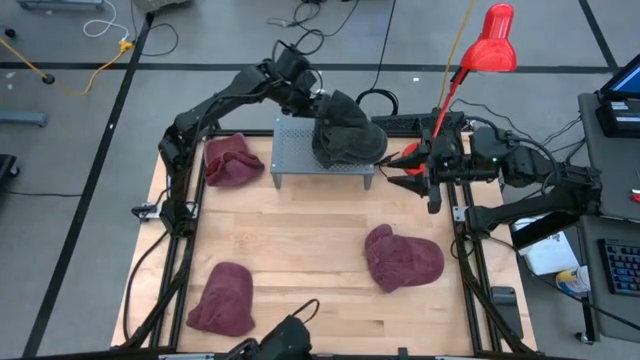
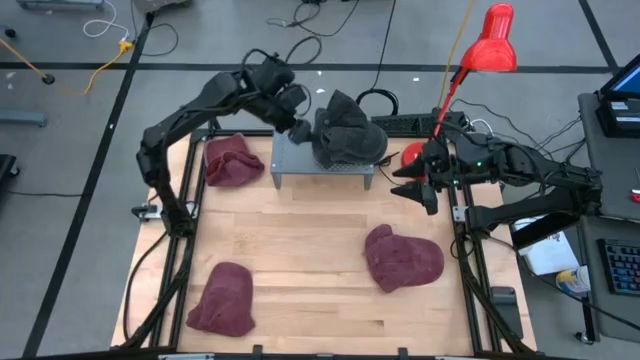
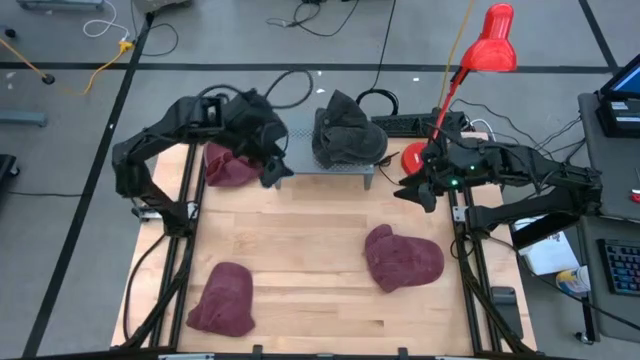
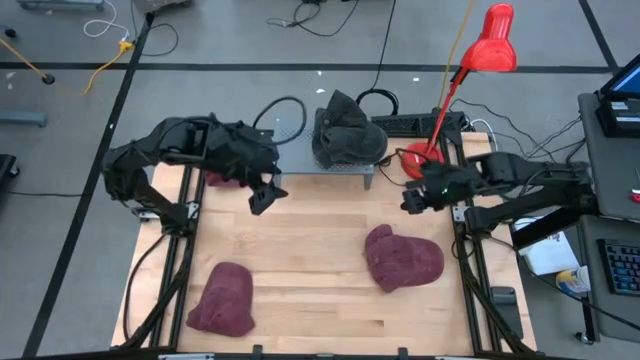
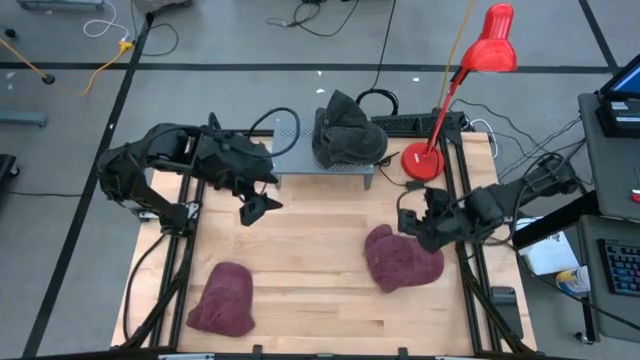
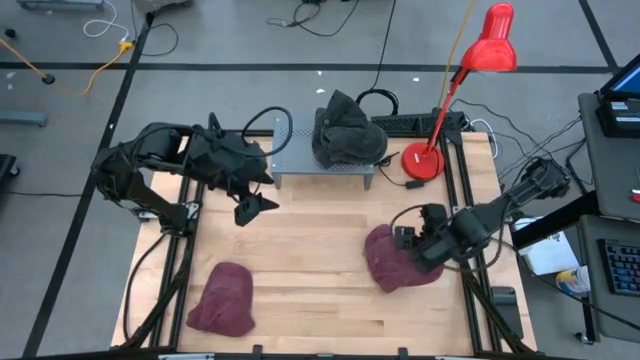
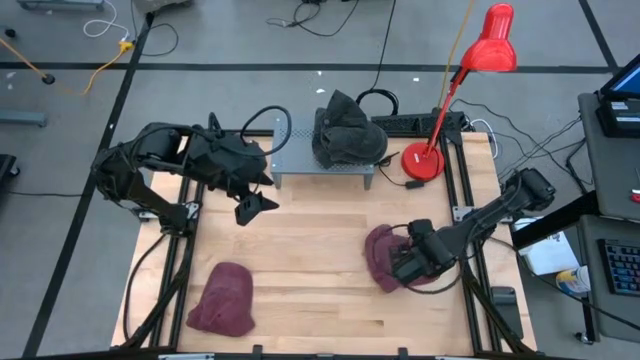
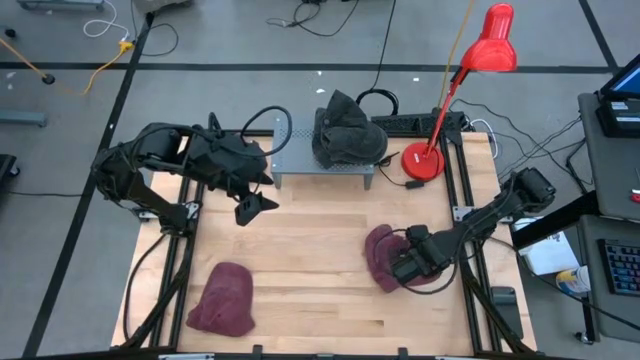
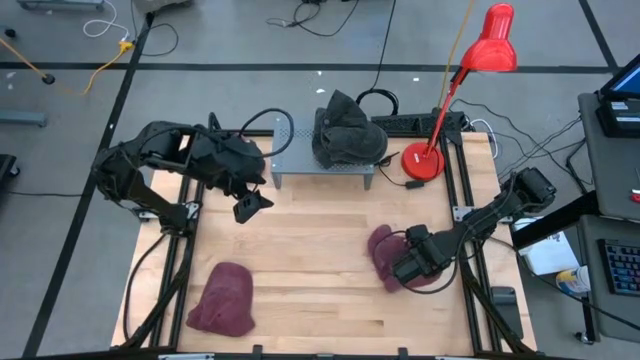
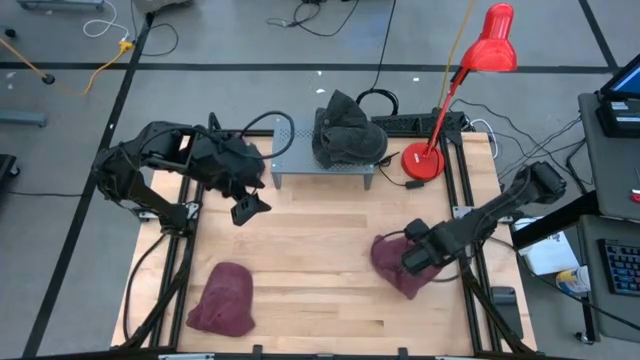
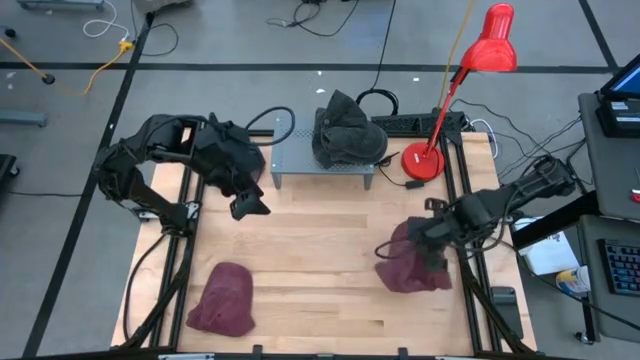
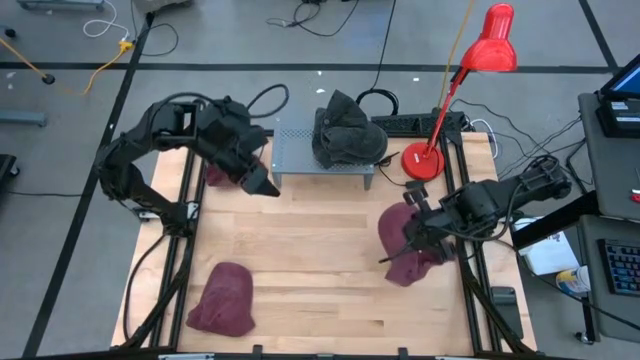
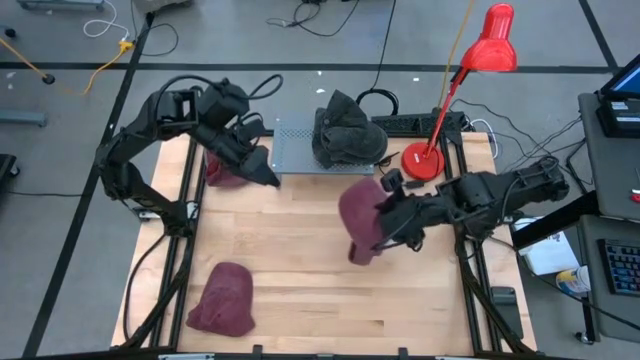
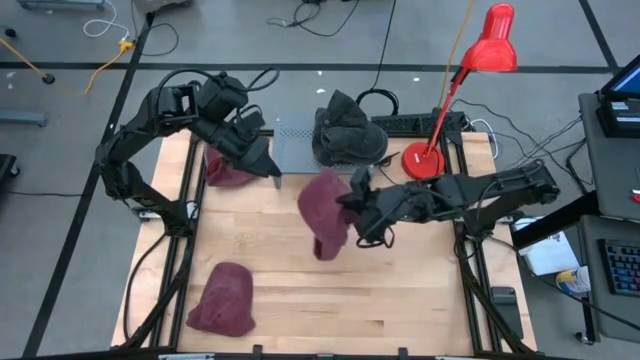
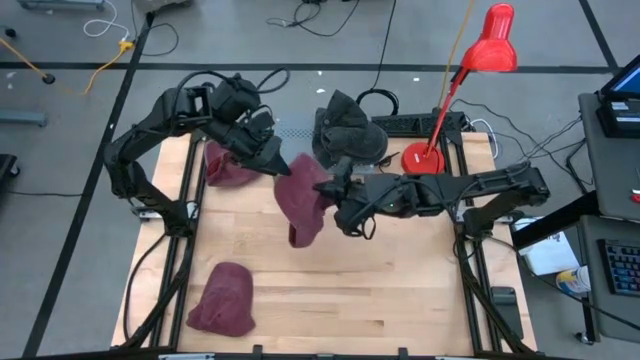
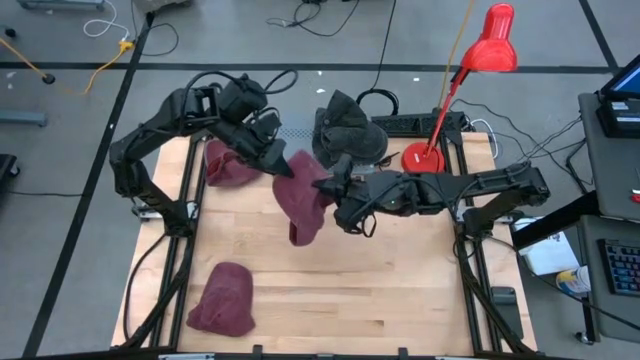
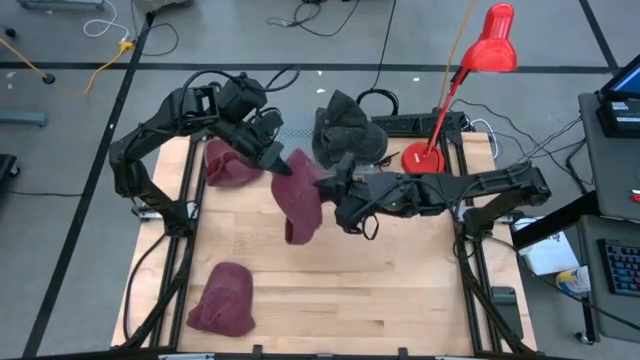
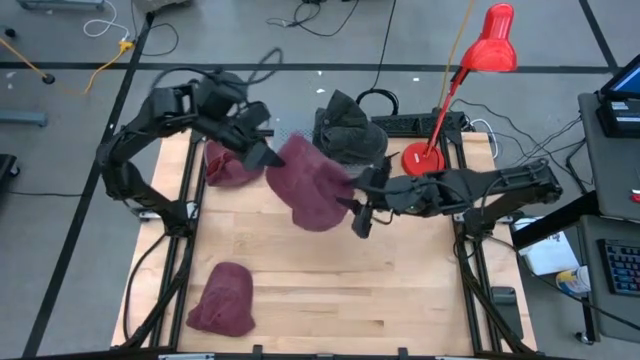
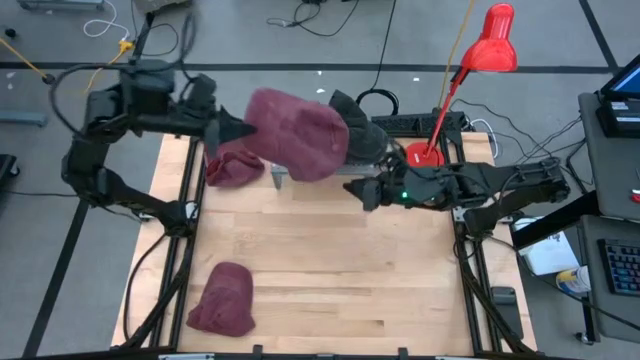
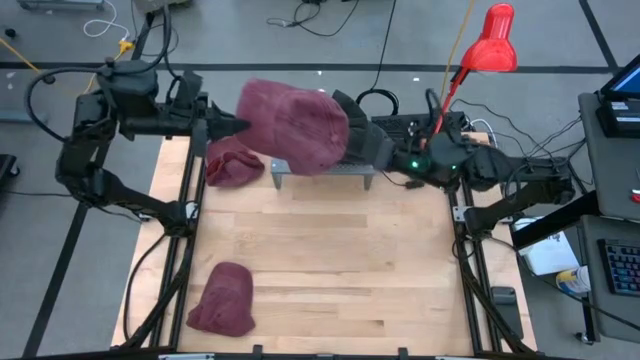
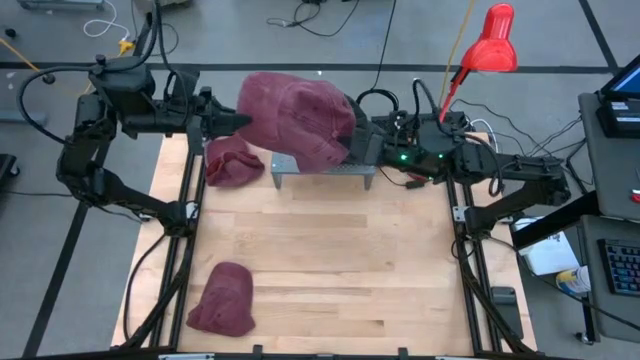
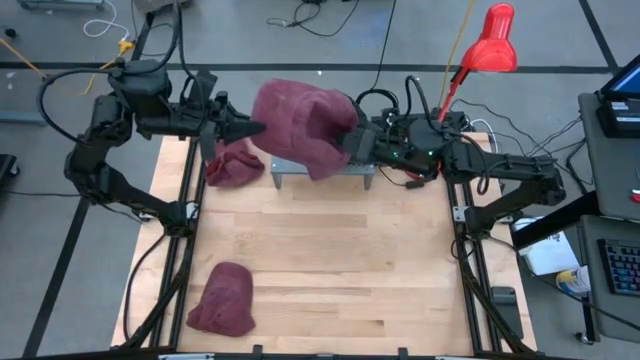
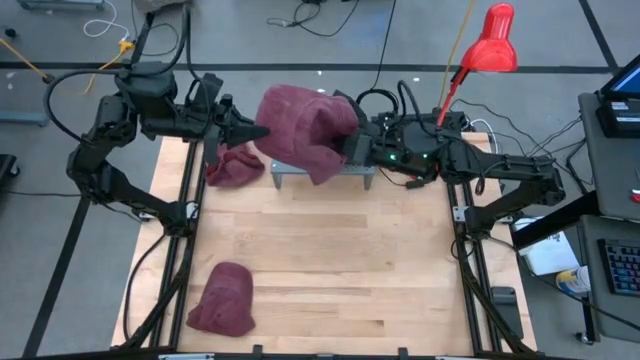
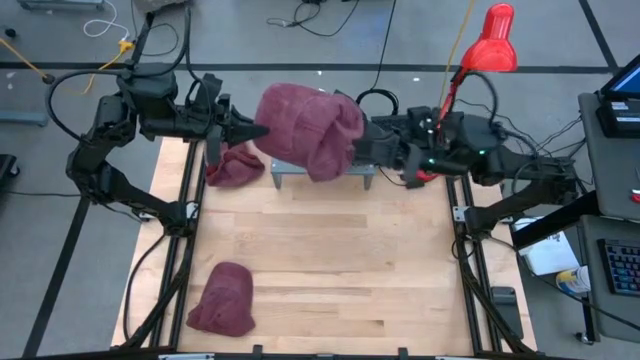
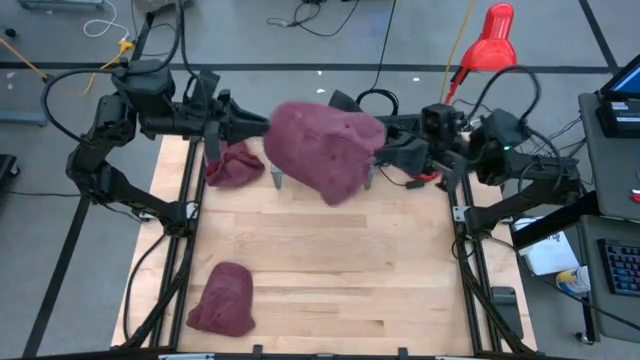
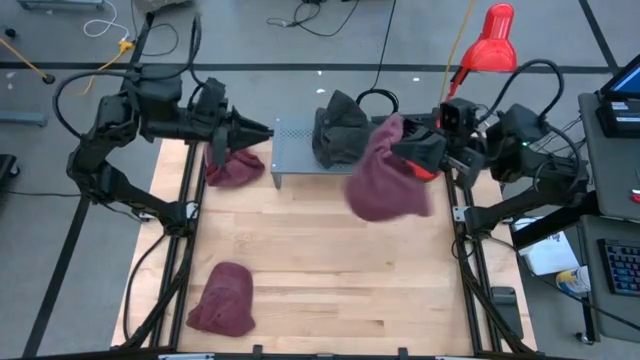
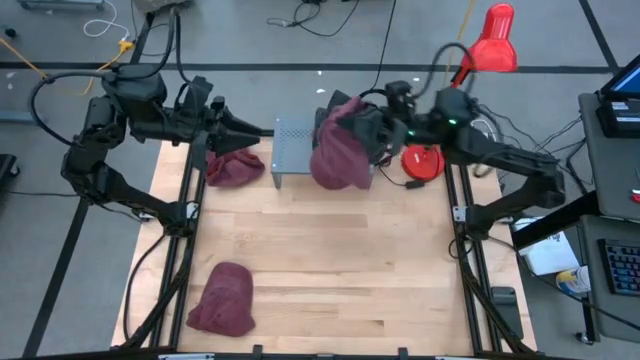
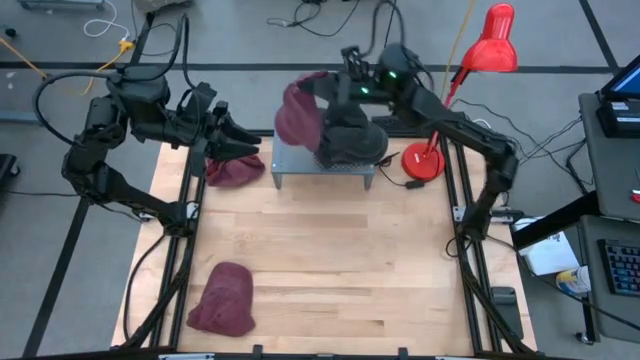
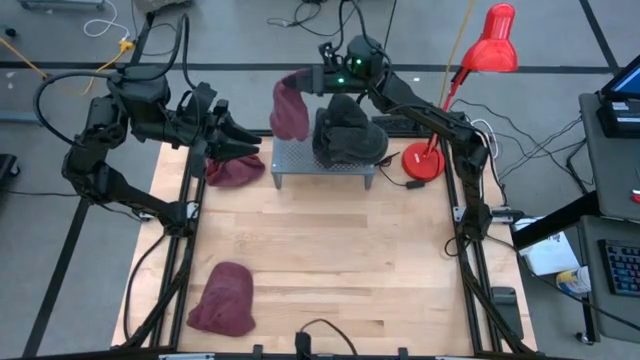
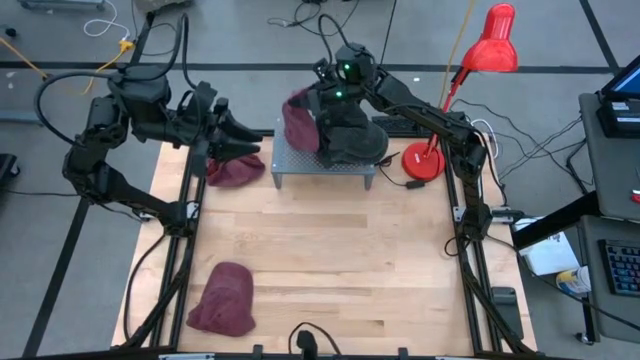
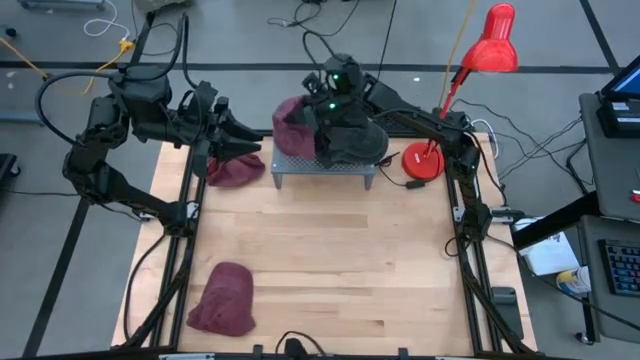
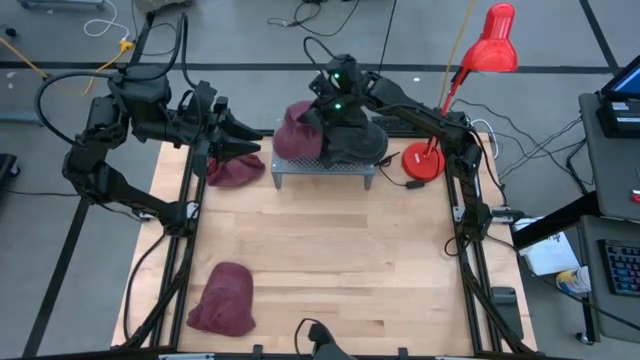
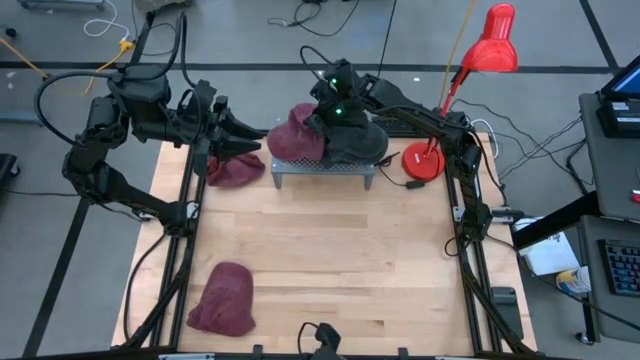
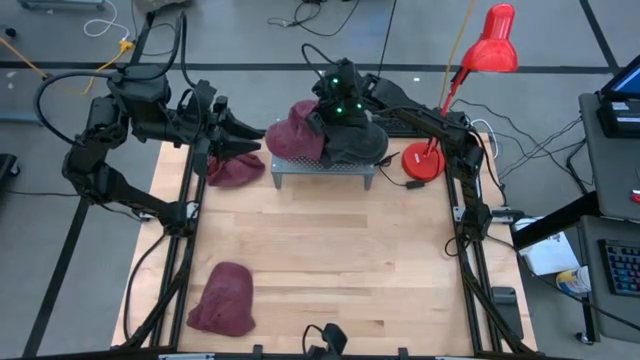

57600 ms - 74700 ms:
Task: Pick & Place hat
Put the bottom right maroon cap on the shelf

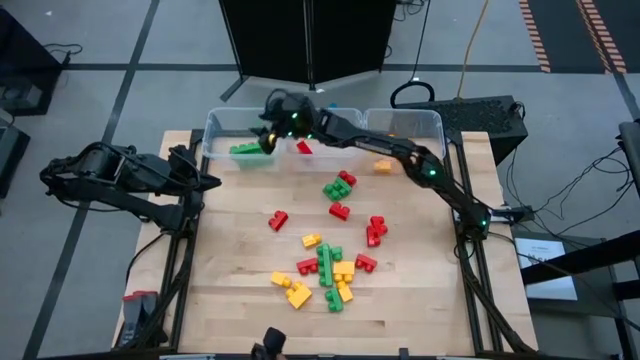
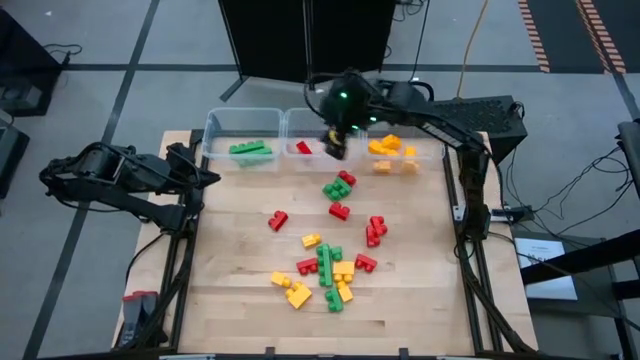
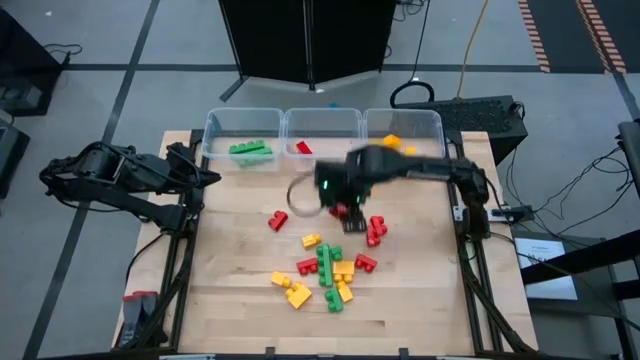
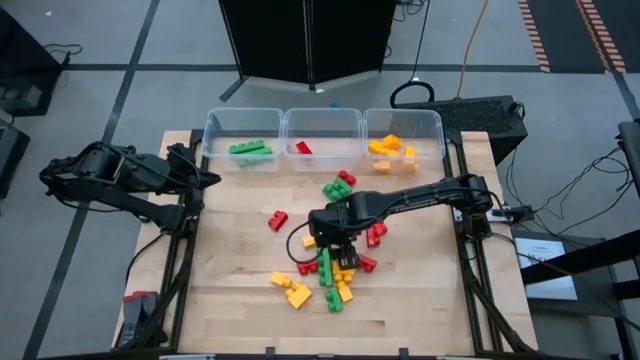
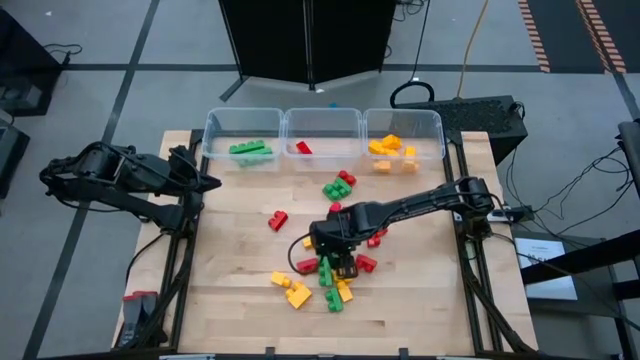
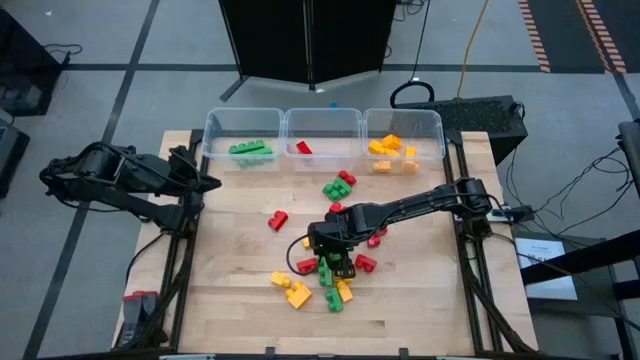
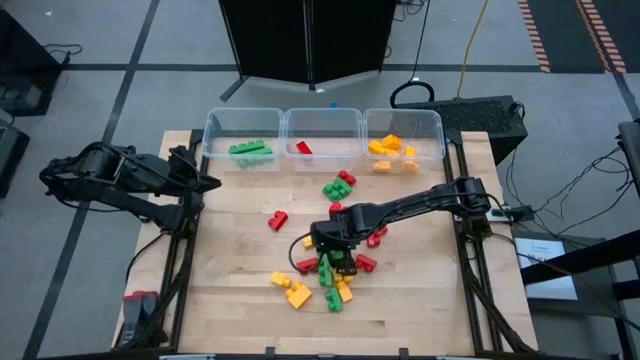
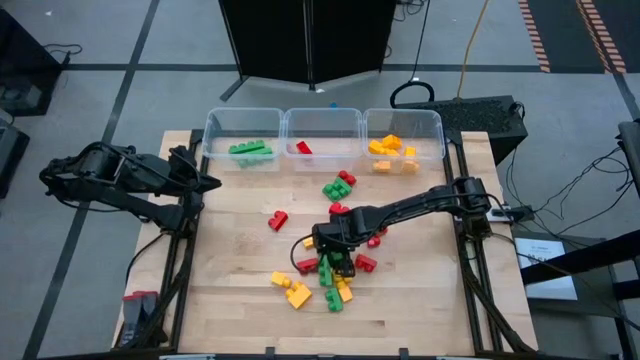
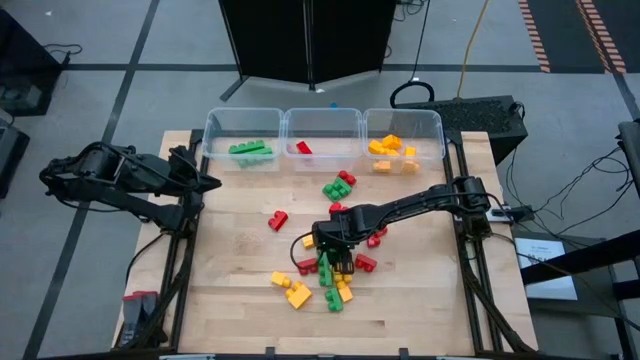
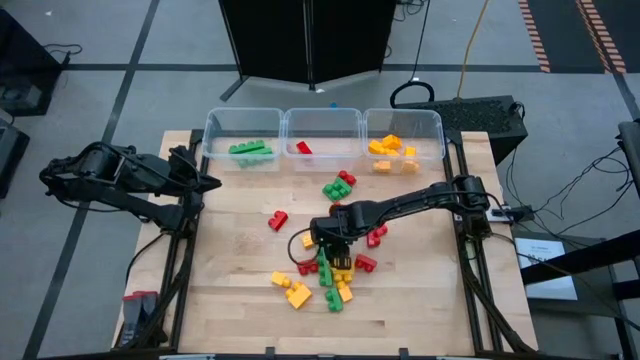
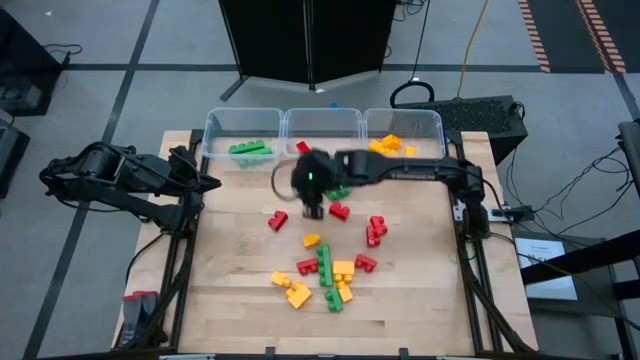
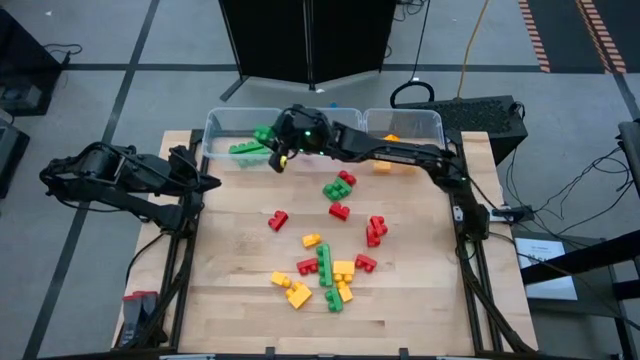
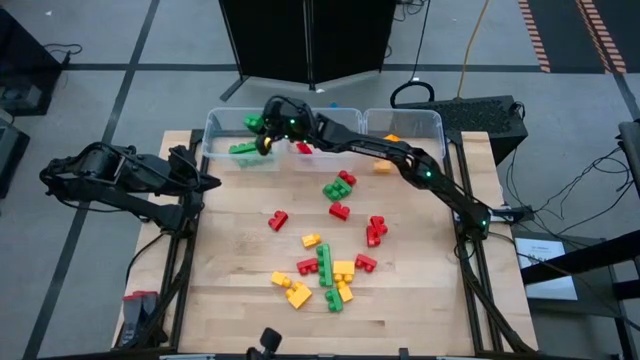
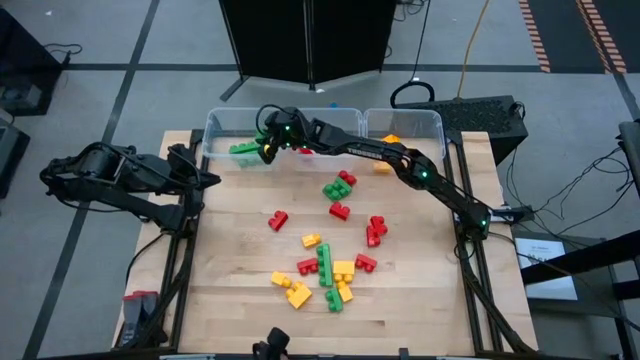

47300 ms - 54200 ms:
Task: Sort blocks
Put the green game piece with 4 studs into the left transparent bin
